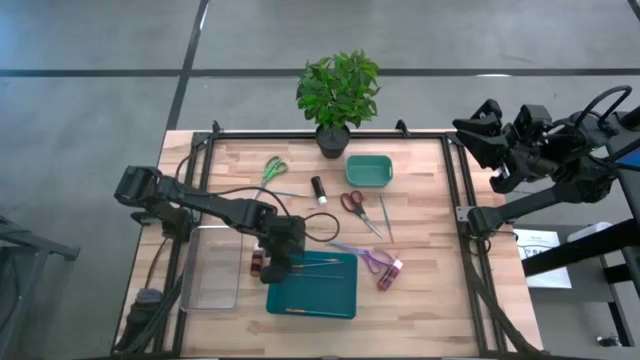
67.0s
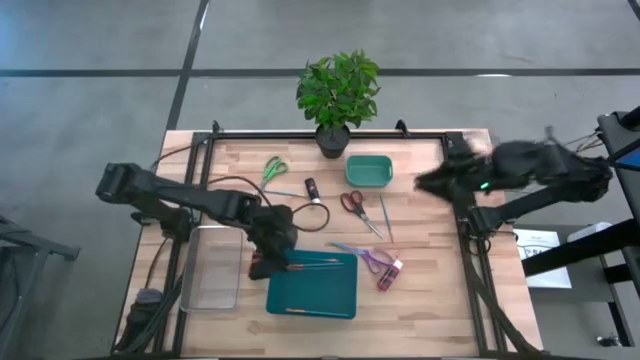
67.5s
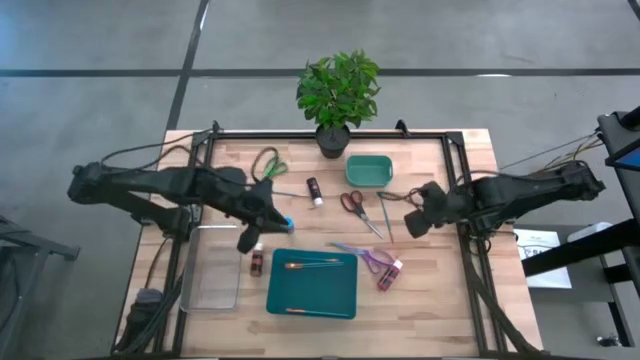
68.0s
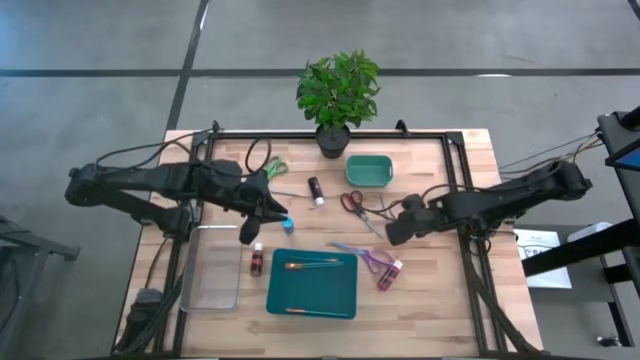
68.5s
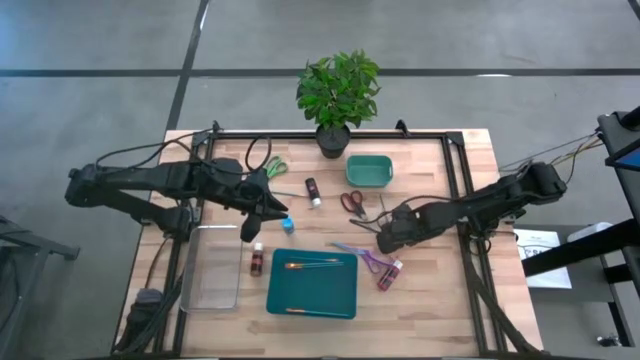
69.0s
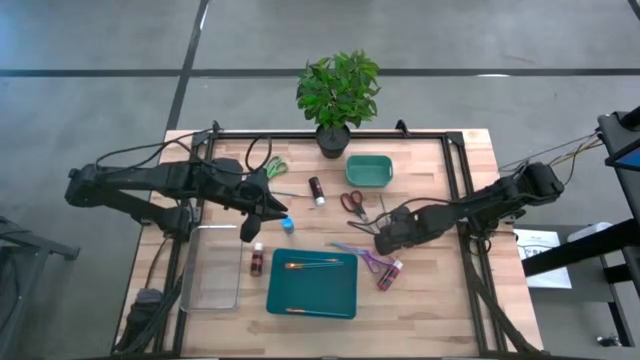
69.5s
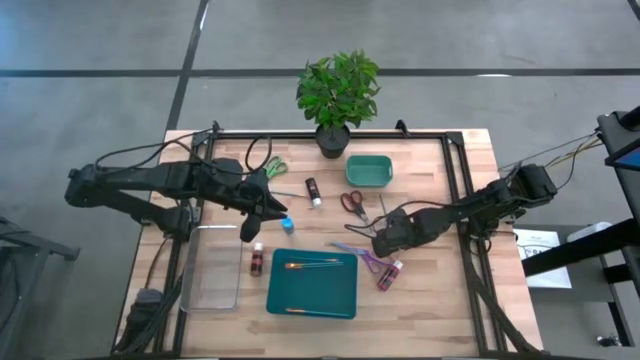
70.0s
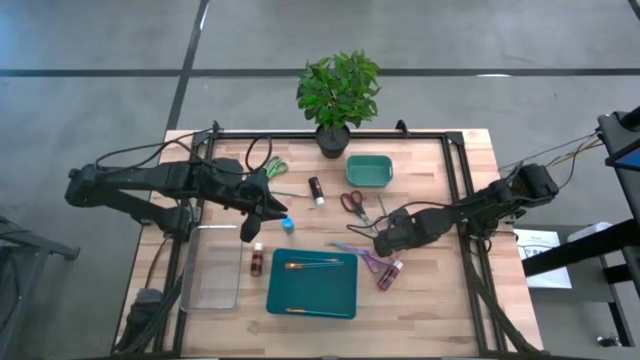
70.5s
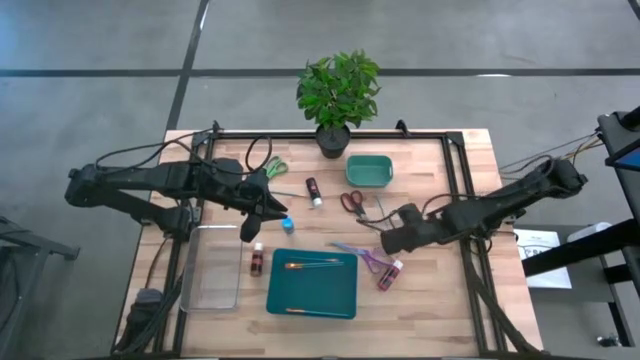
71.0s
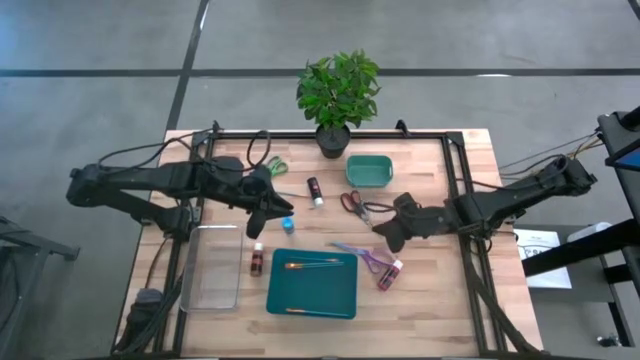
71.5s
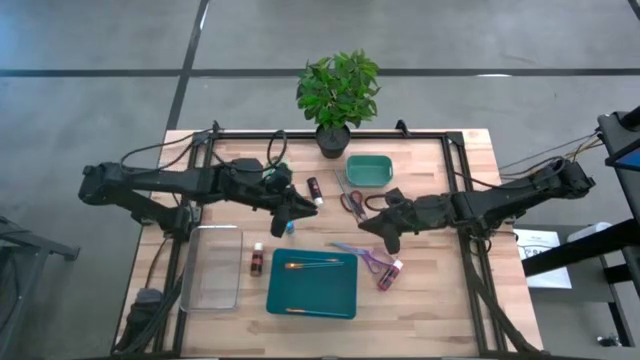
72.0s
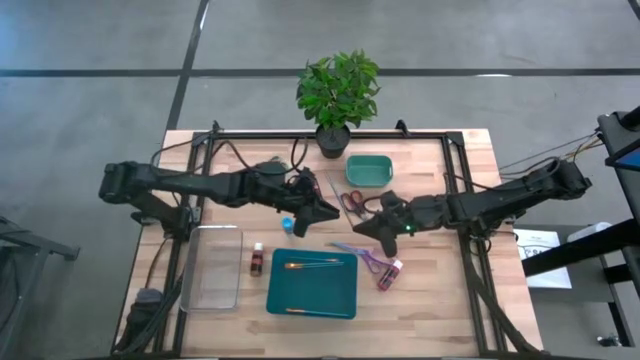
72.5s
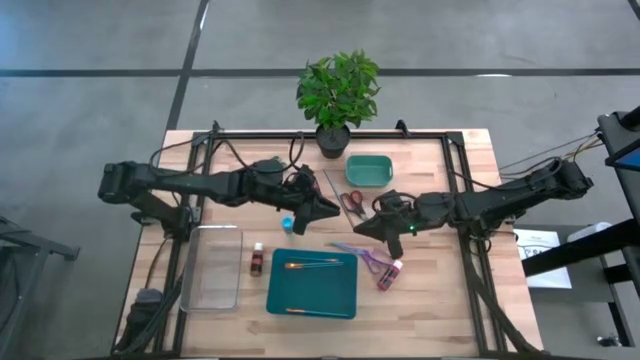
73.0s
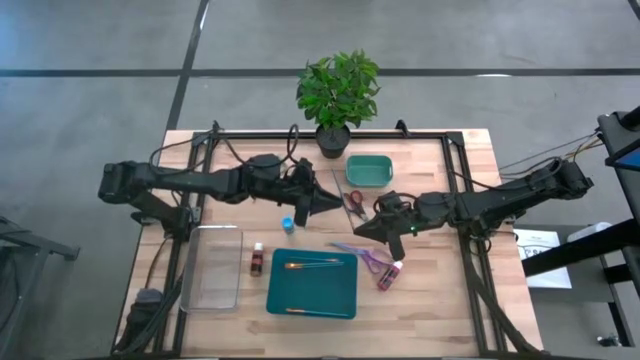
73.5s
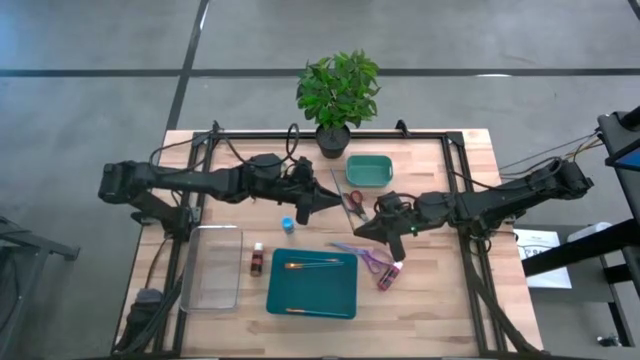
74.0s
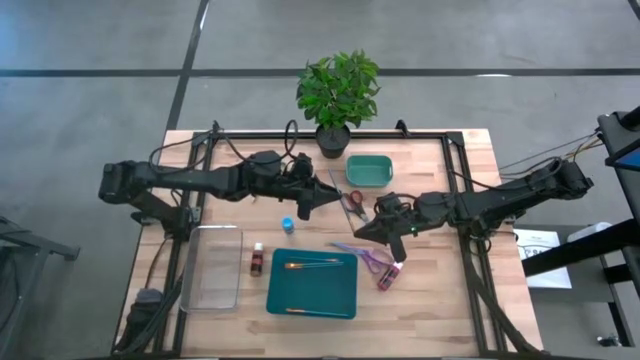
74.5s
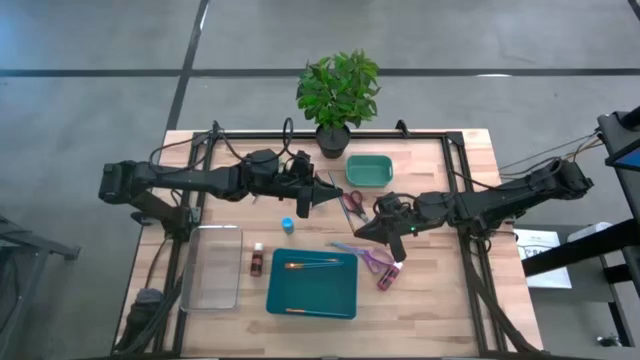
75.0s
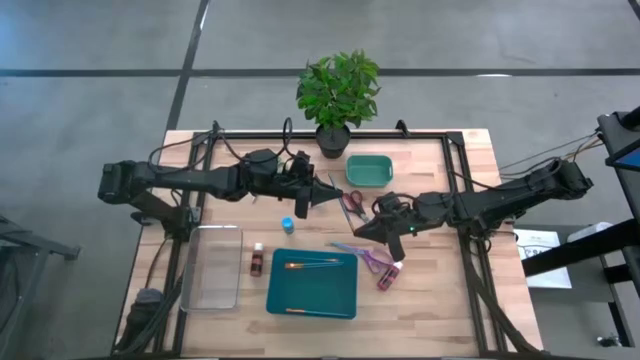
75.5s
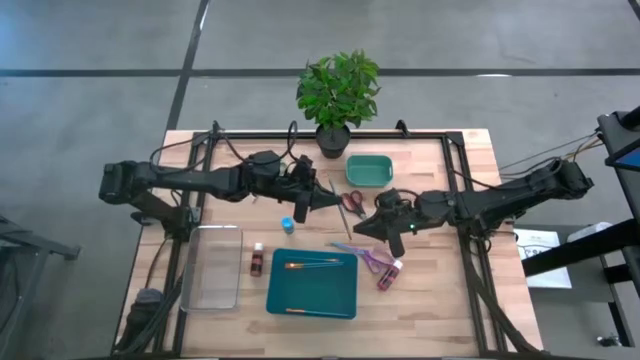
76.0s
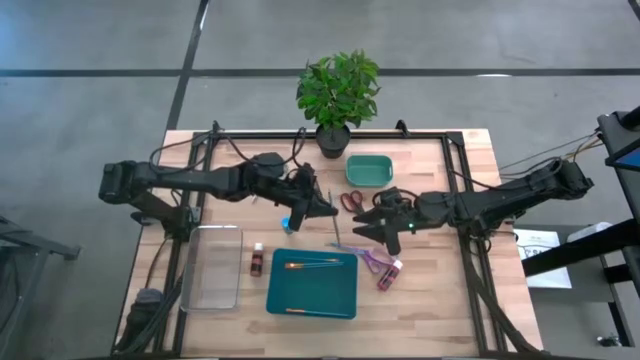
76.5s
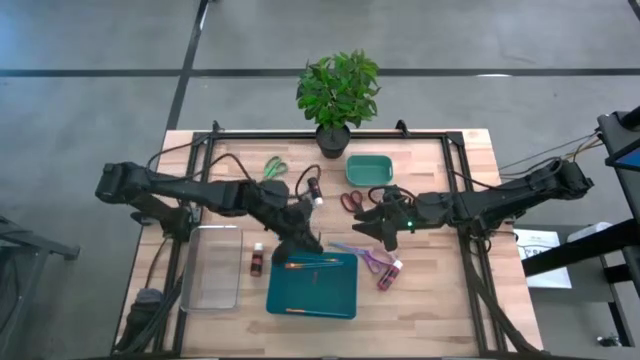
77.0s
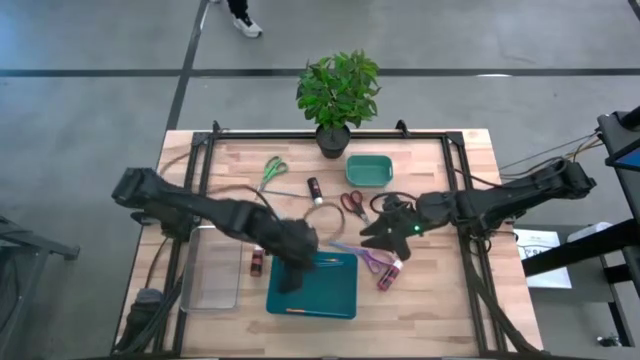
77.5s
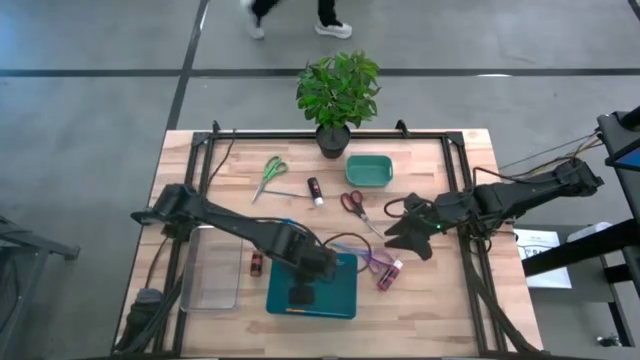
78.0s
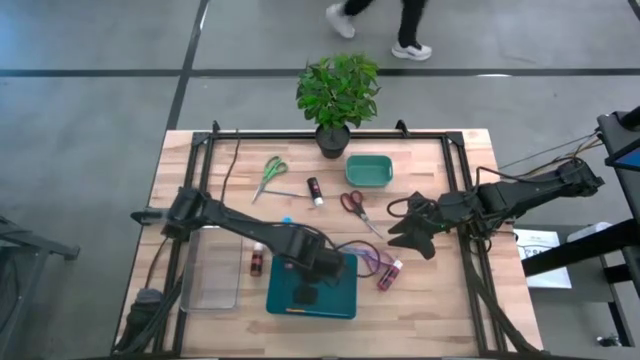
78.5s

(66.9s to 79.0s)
Task: Pick & Place Paint Supplies
Put the blue paint brush into the blue bin

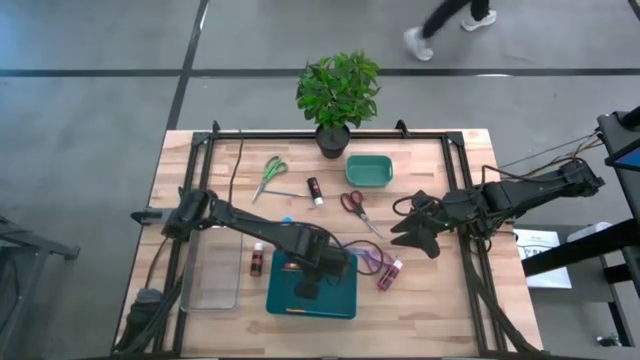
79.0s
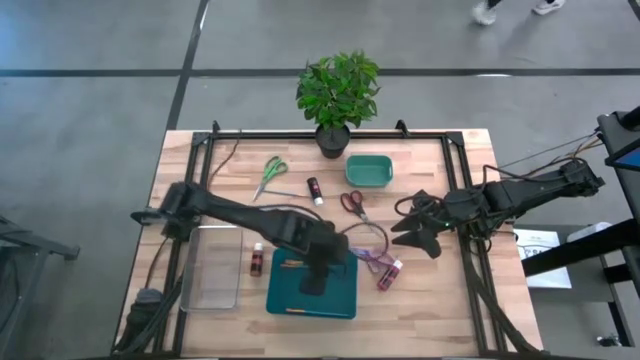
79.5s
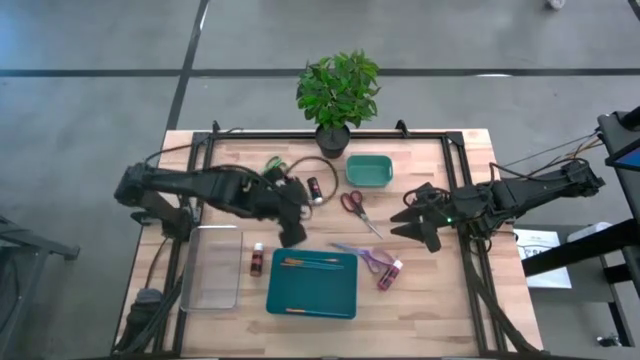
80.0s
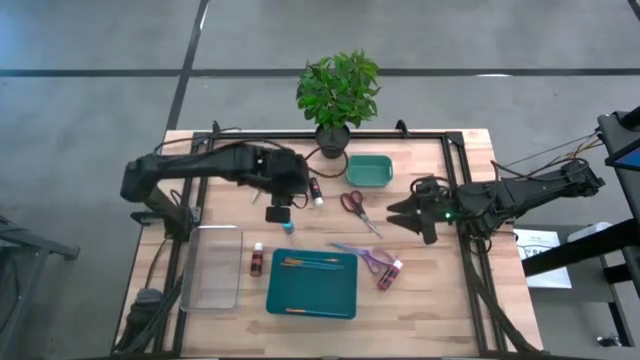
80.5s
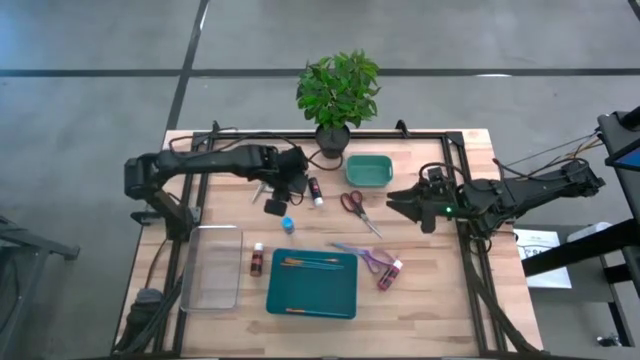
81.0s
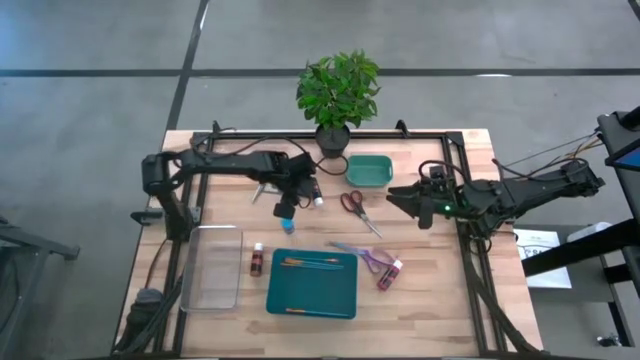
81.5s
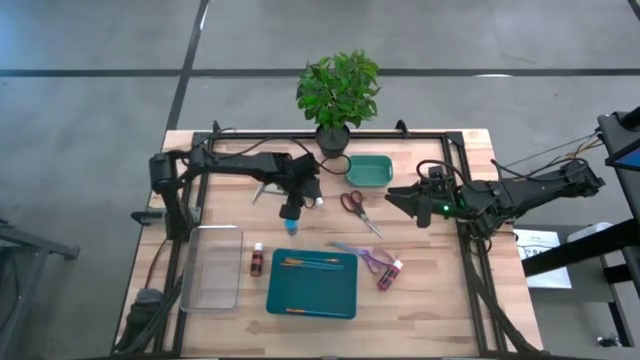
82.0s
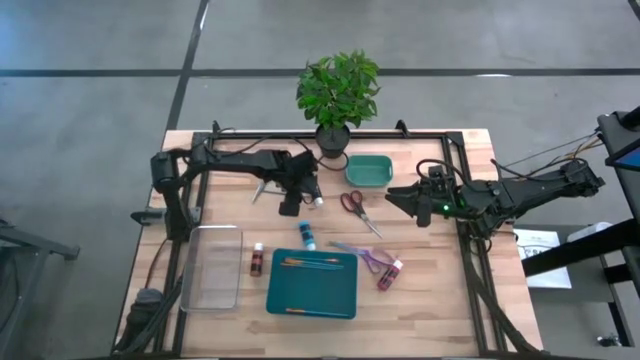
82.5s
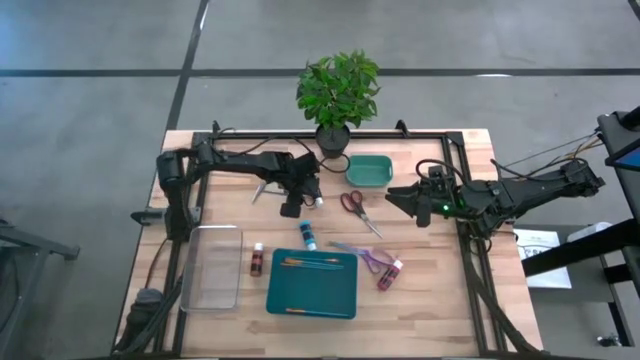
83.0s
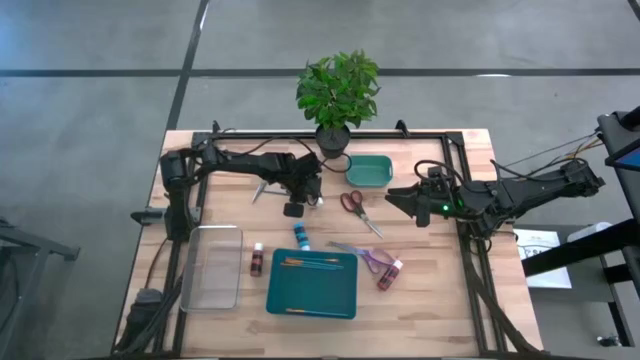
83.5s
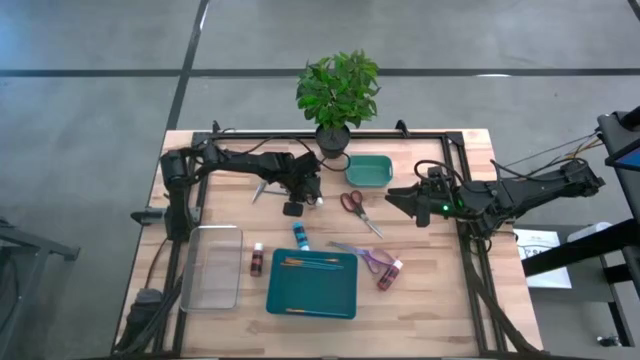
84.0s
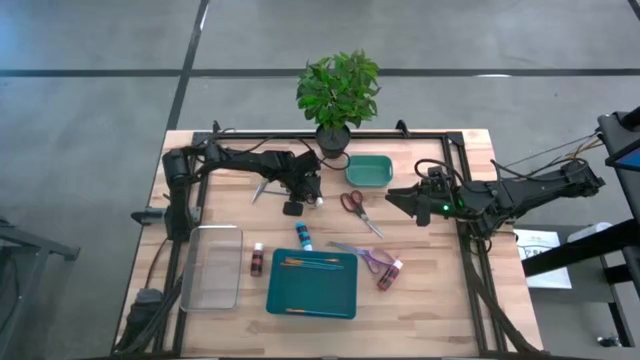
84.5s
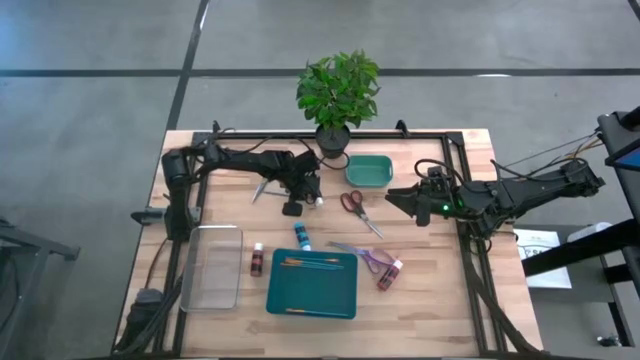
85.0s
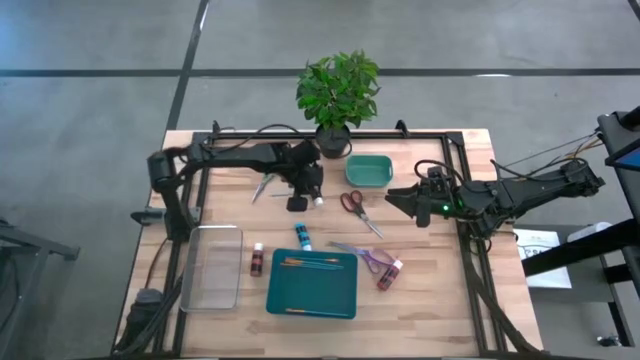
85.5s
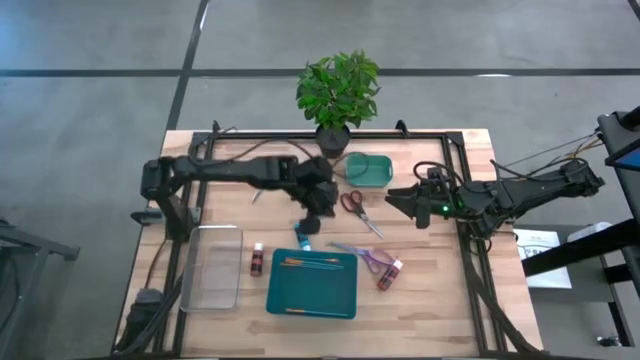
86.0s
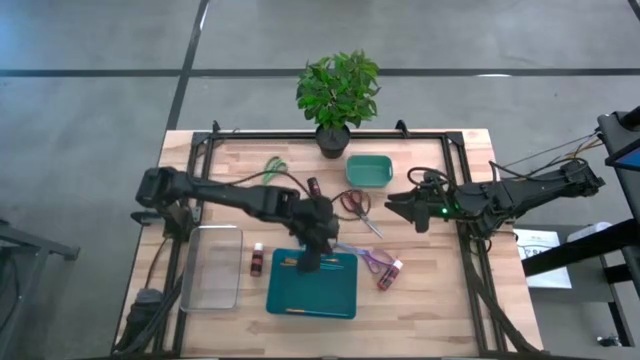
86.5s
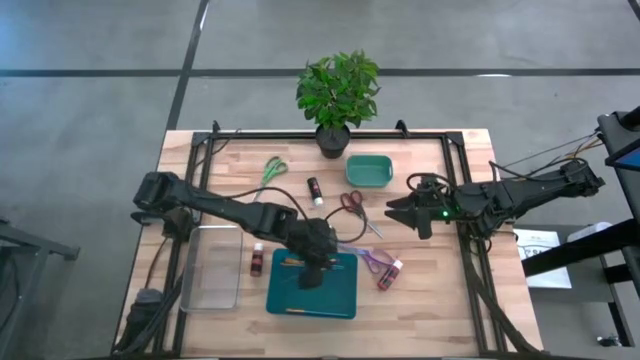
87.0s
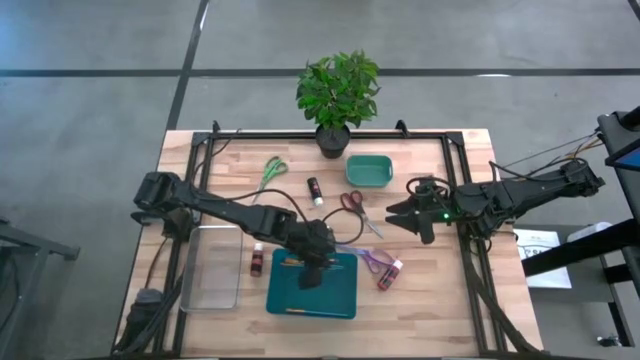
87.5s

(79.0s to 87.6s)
Put the blue paint brush into the blue bin

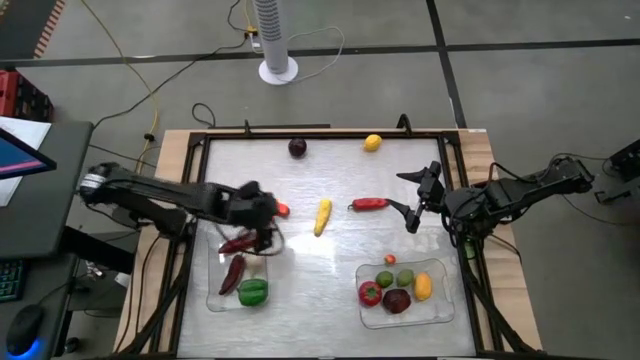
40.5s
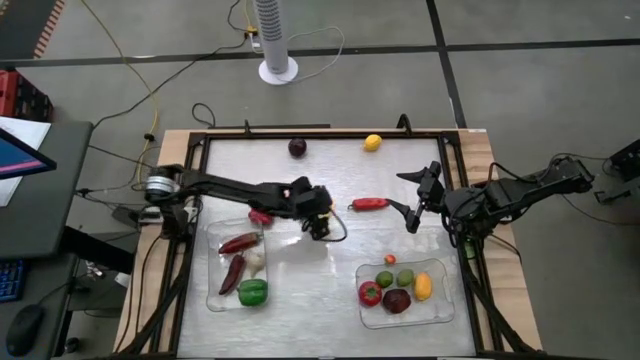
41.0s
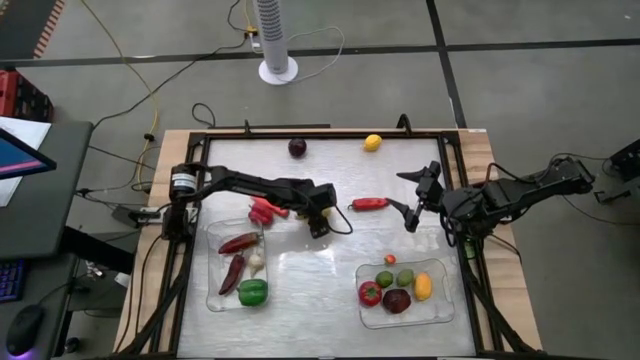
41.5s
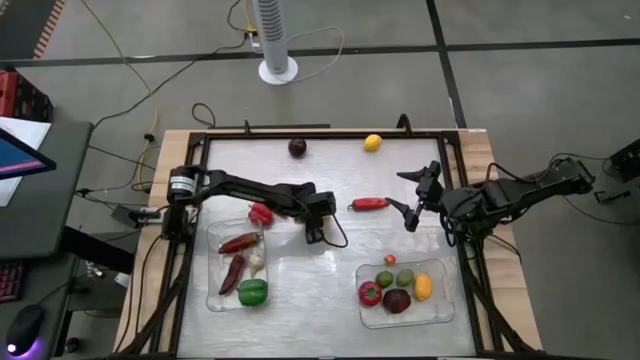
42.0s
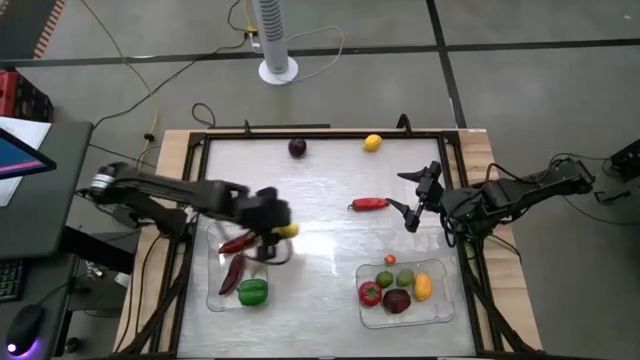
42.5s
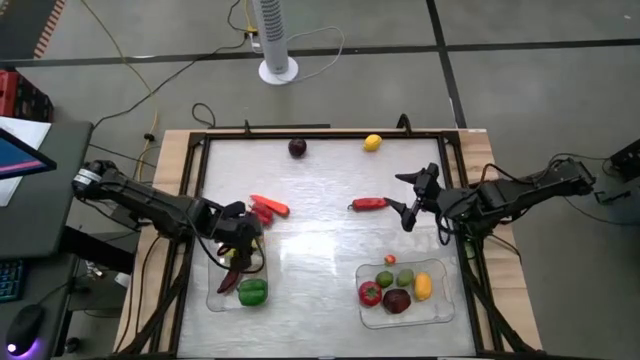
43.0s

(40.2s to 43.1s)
Task: Sort produce into baskets
Put the corn into the left transparent bin
